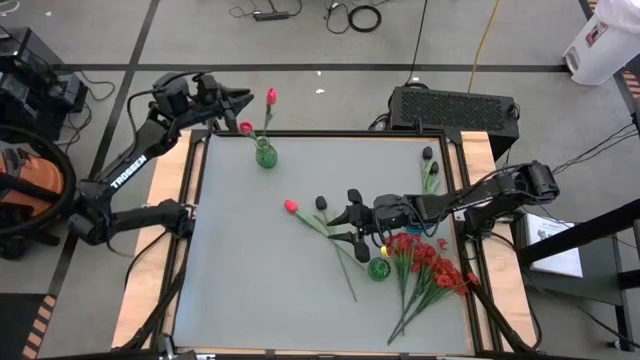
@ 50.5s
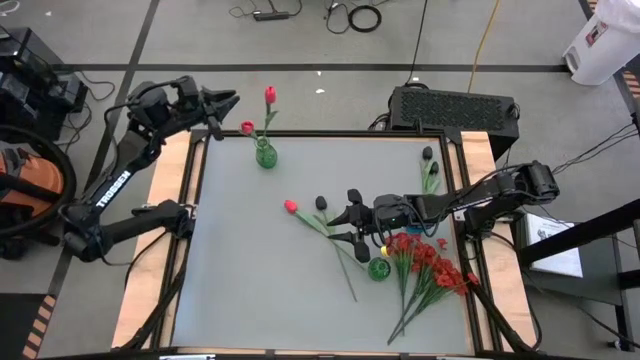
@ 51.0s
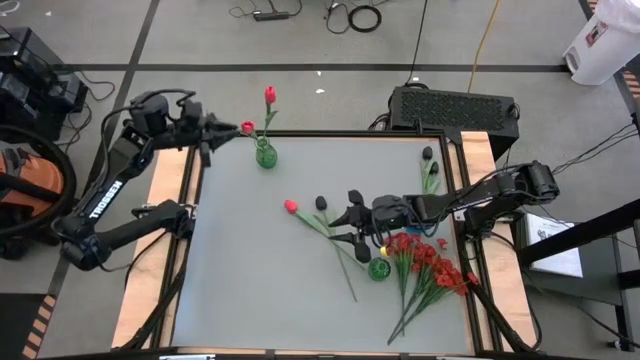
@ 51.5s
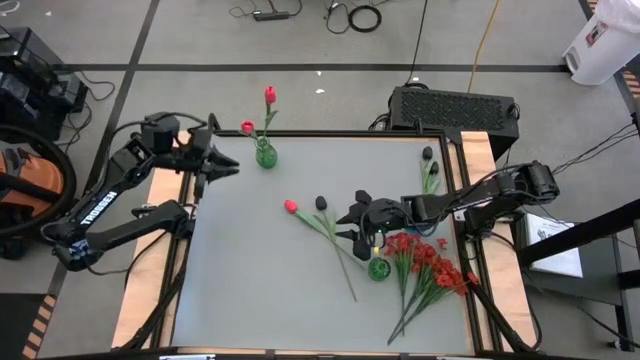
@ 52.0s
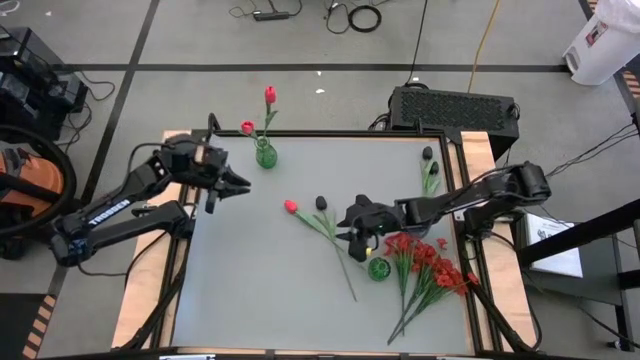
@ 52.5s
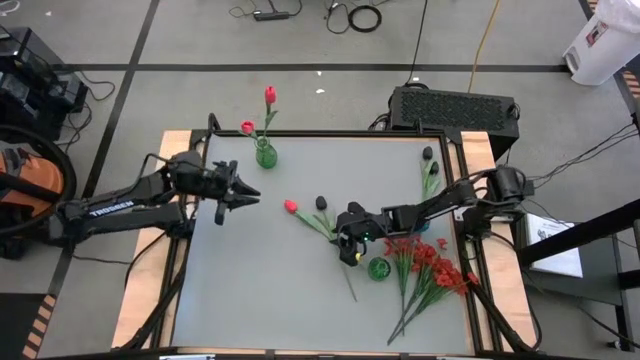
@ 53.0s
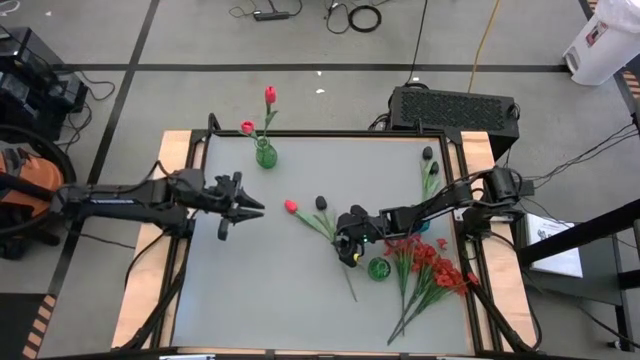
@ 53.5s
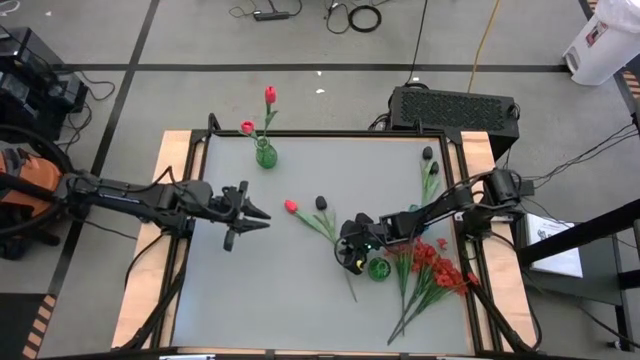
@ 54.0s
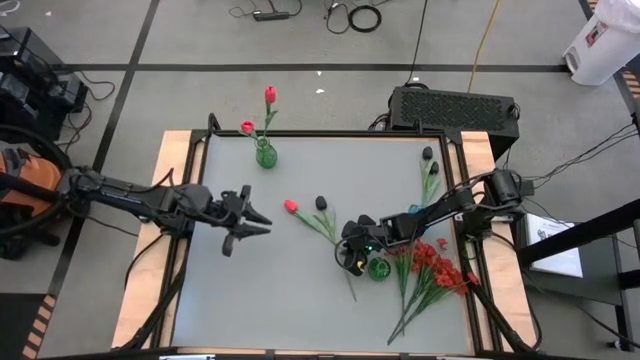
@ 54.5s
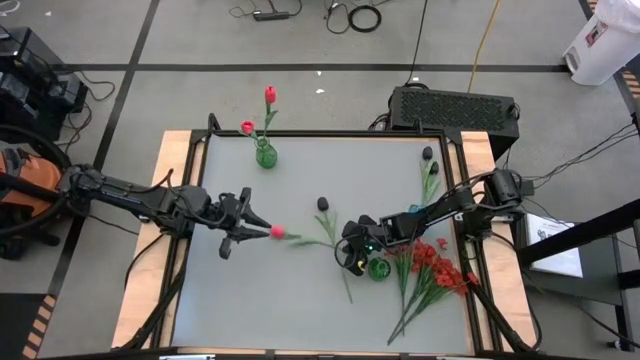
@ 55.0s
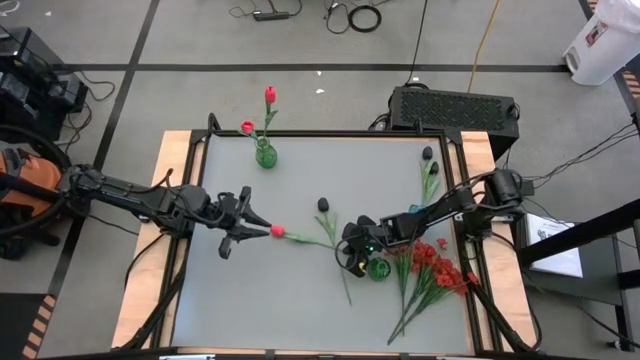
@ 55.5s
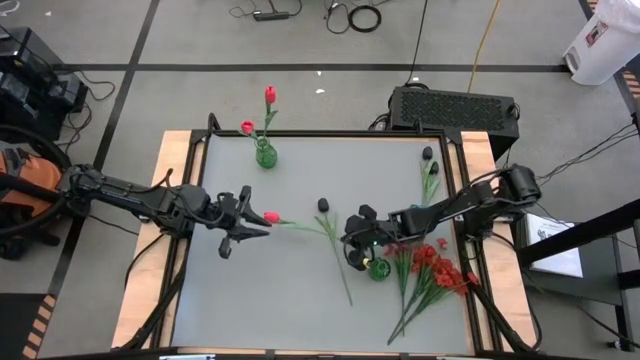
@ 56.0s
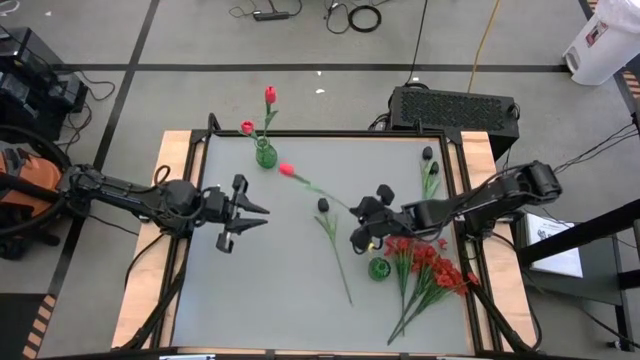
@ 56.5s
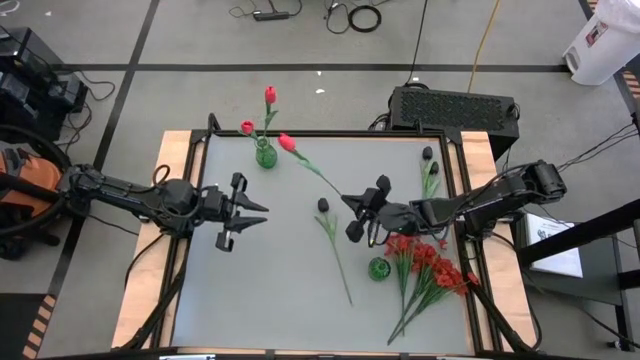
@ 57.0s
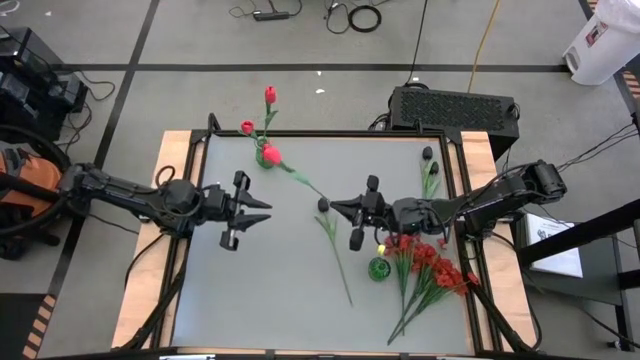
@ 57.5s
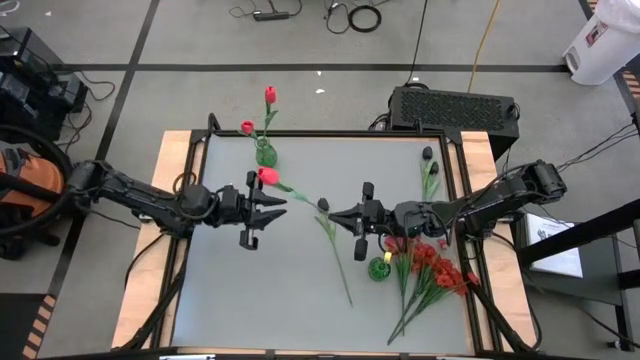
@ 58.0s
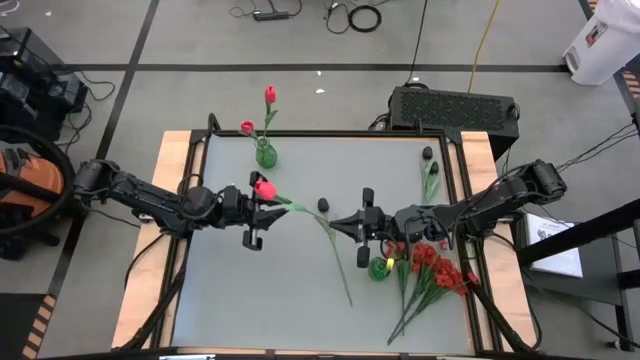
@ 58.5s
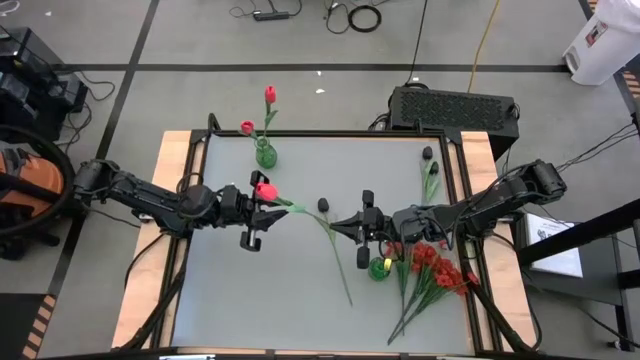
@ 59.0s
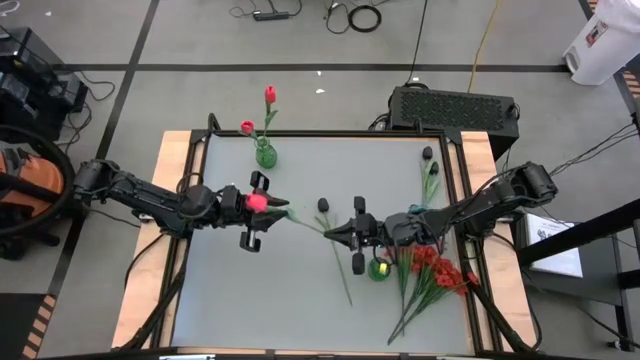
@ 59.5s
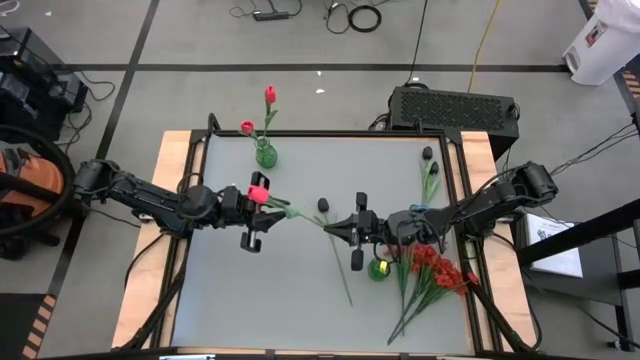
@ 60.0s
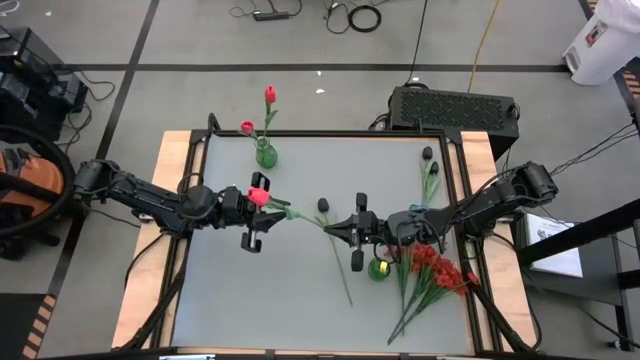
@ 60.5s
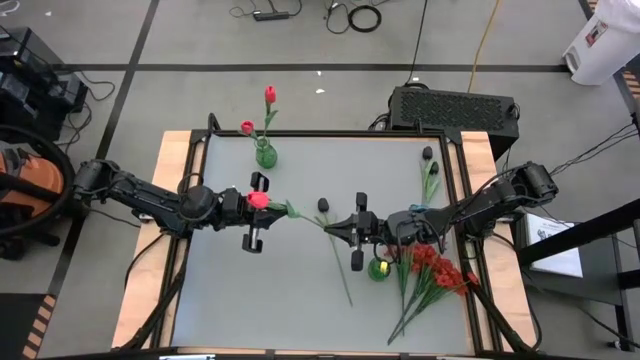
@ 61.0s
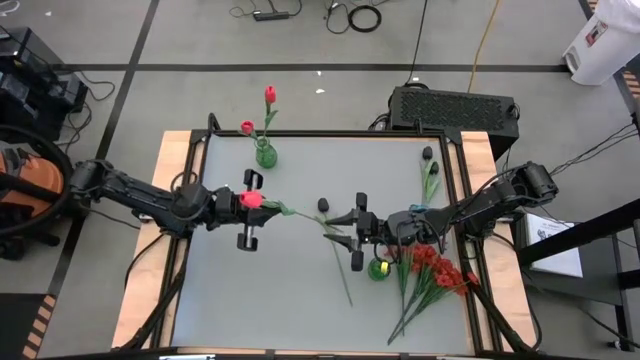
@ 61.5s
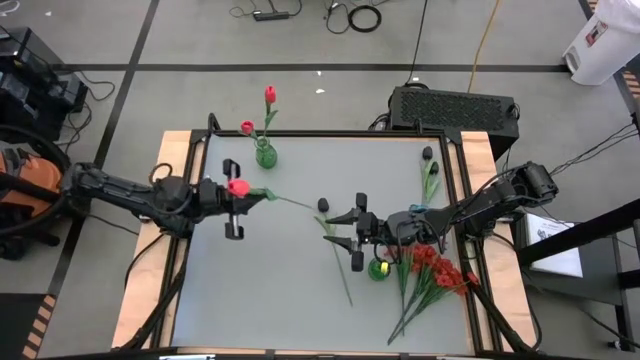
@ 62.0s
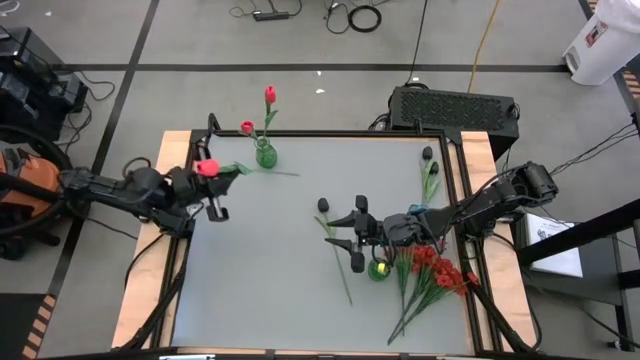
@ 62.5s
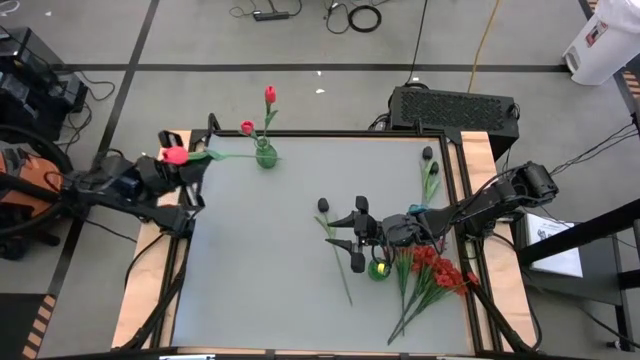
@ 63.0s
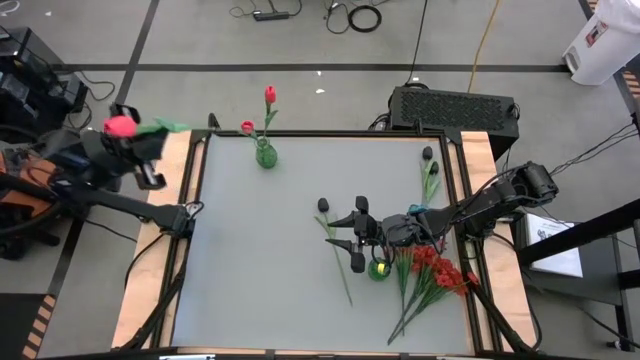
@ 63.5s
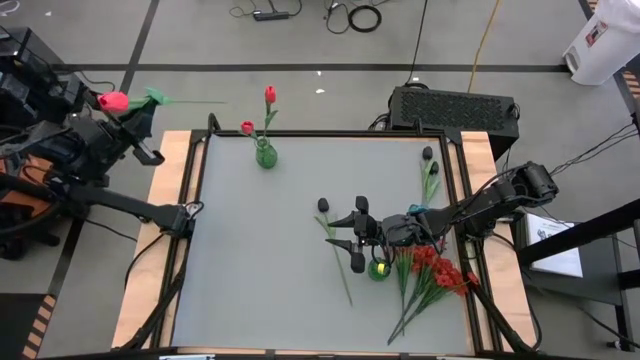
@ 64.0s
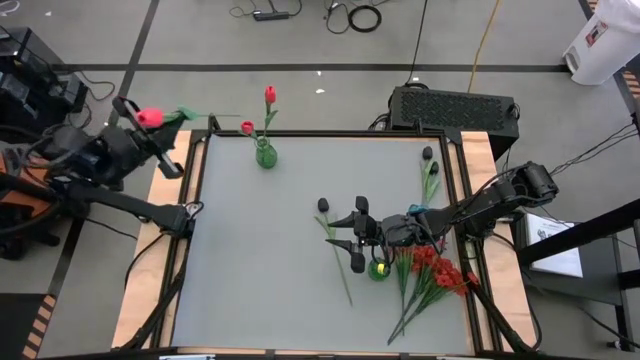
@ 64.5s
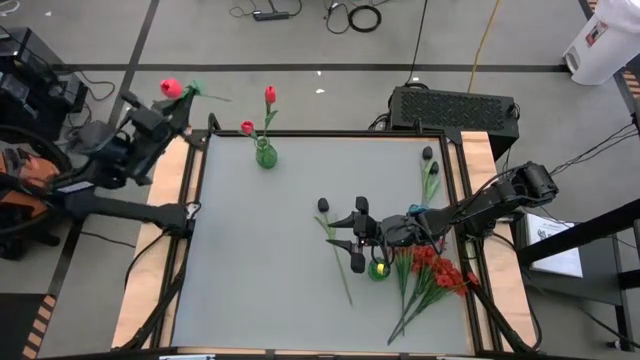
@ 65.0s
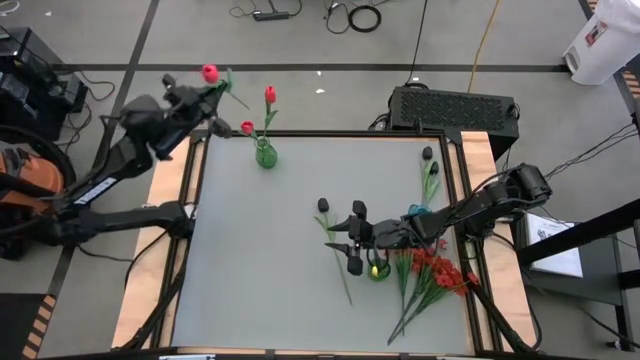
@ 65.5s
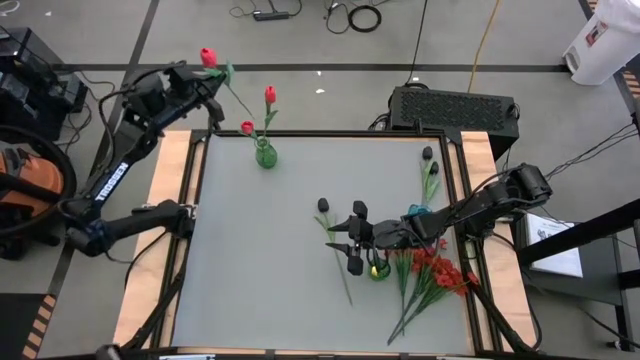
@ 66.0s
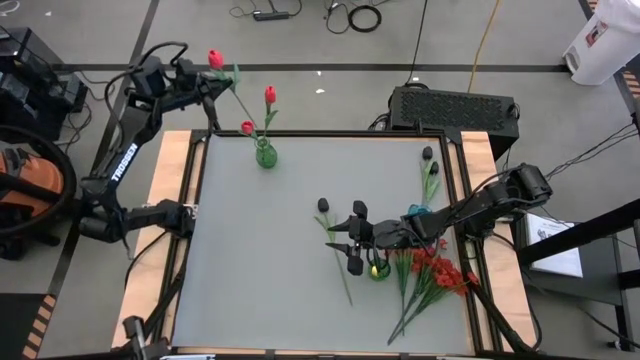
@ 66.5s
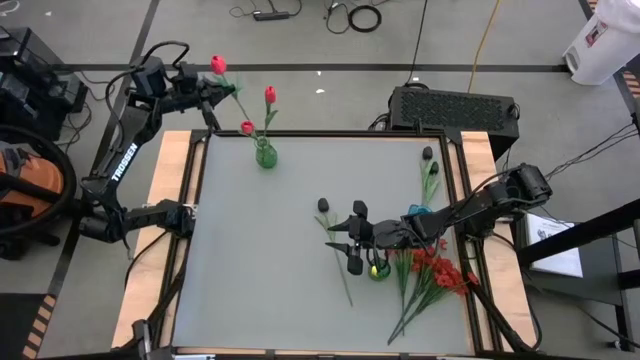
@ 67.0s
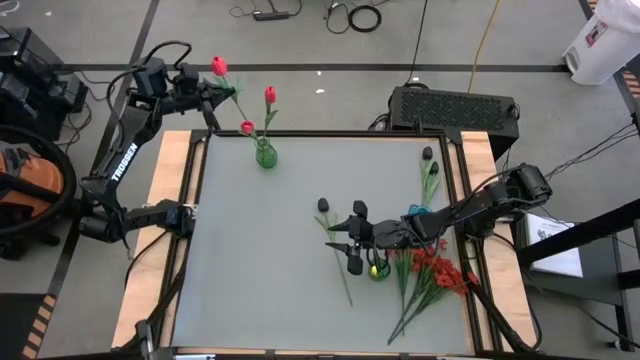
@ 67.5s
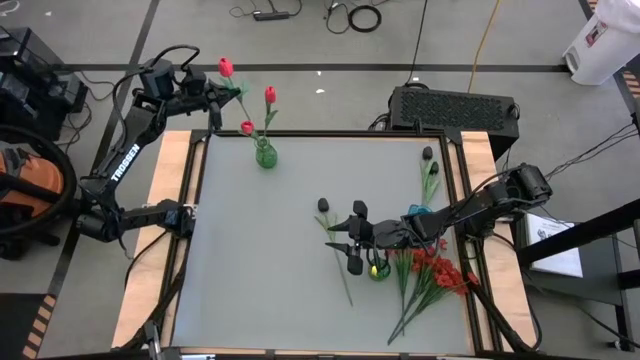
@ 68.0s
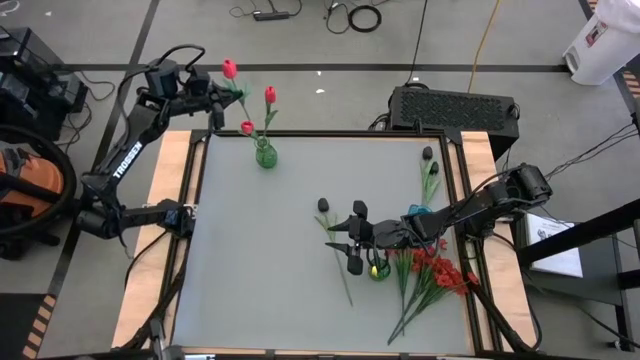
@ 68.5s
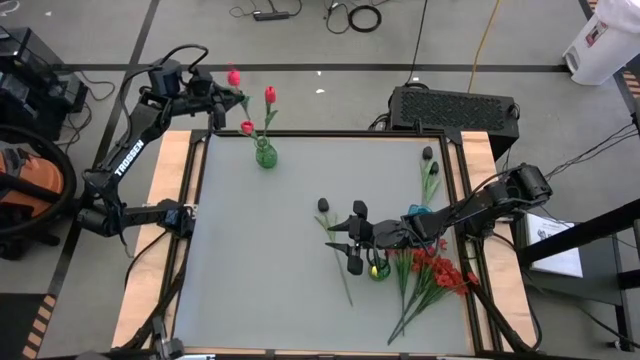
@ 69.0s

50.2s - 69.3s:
Task: Sort flowers into vase by color
Put the pink flower into the top green vase

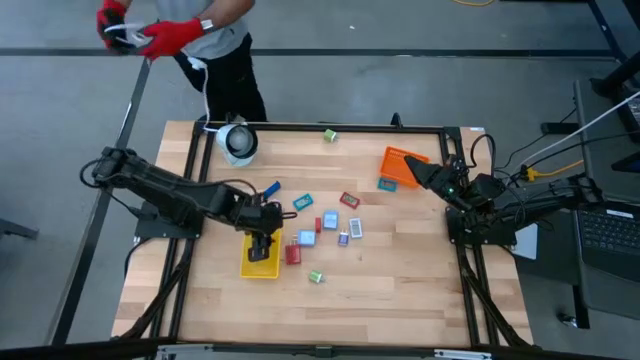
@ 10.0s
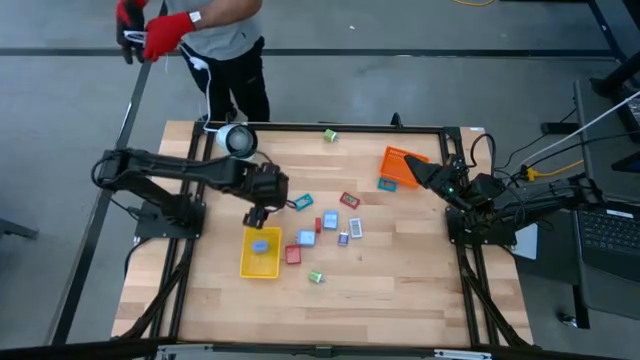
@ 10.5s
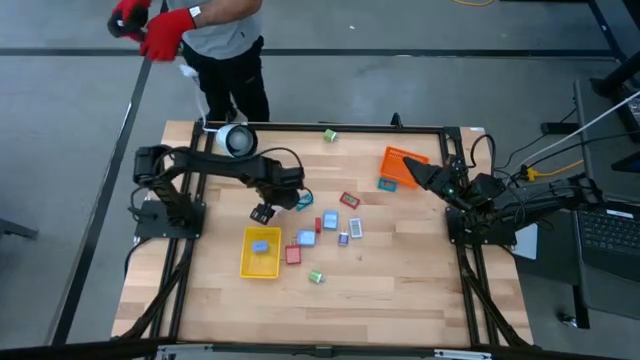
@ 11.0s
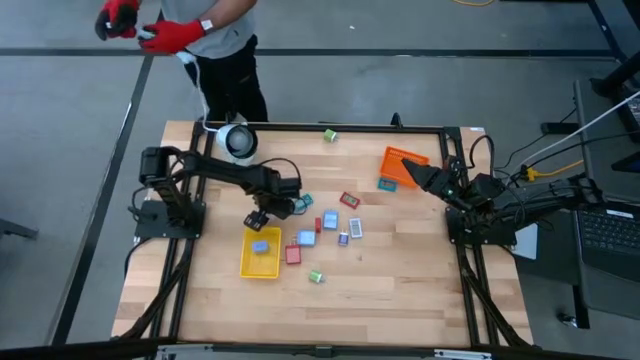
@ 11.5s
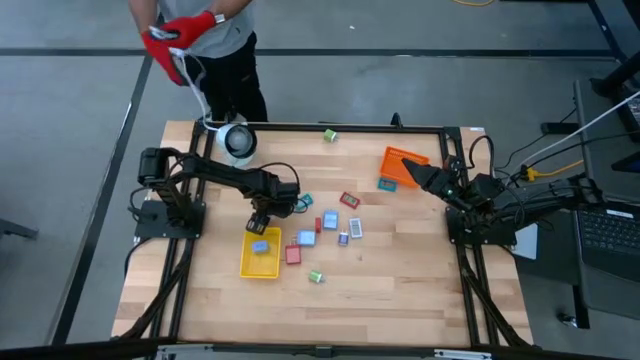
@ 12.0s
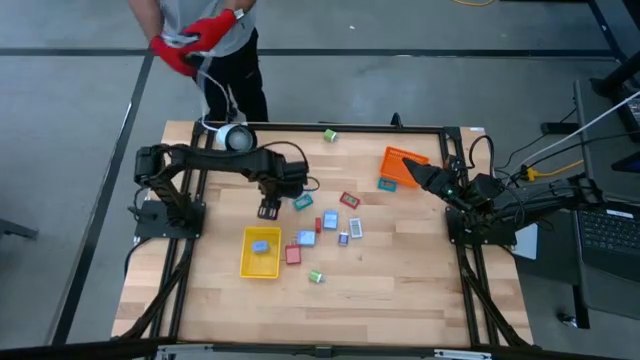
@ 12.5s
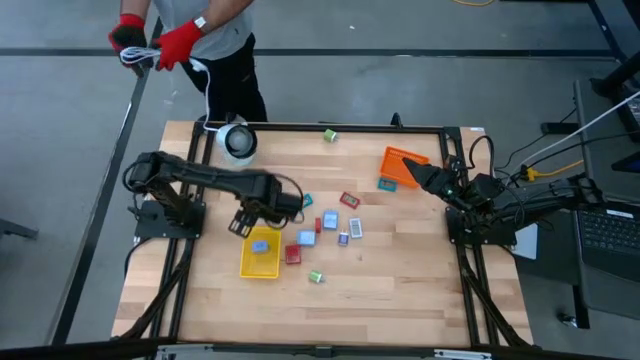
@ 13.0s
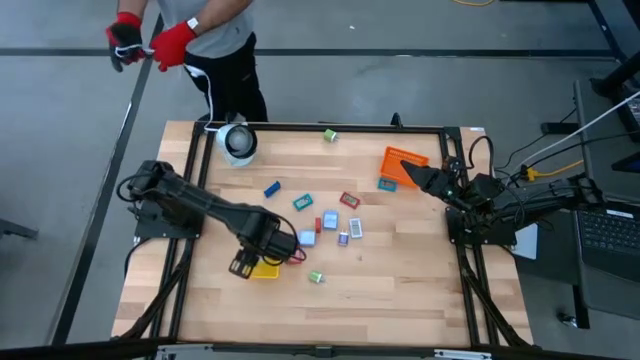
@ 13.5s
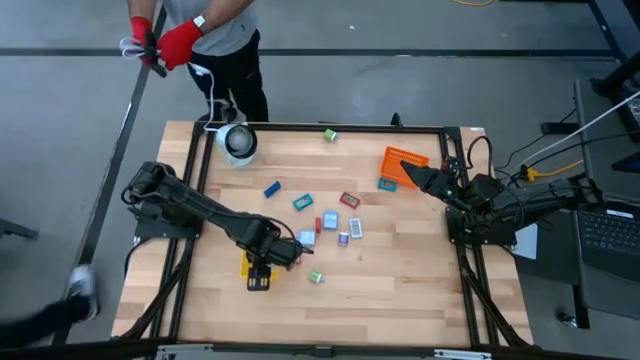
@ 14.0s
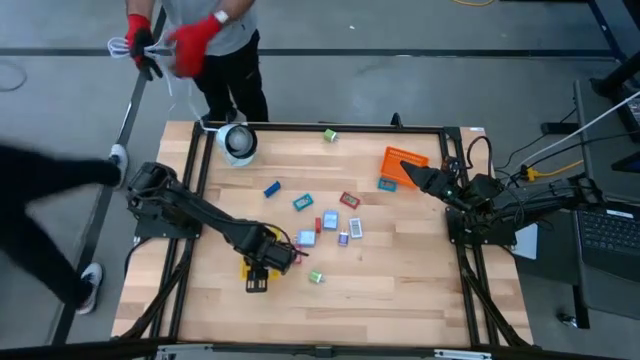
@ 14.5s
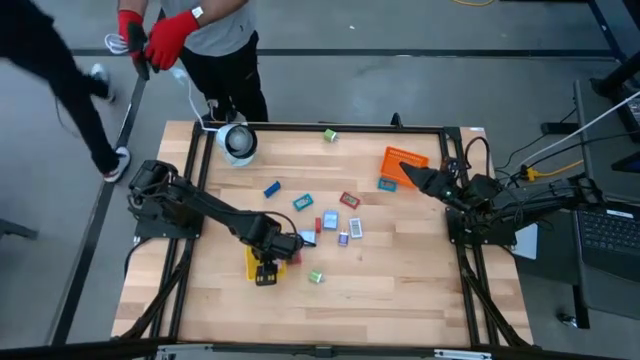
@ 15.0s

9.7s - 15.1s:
Task: Pick & Place Office items
Put the white charger adapter into the yellow bin
